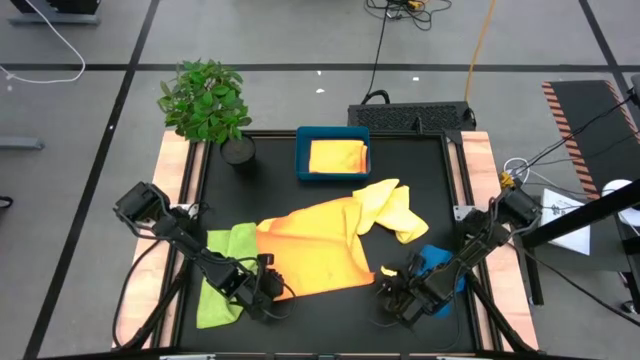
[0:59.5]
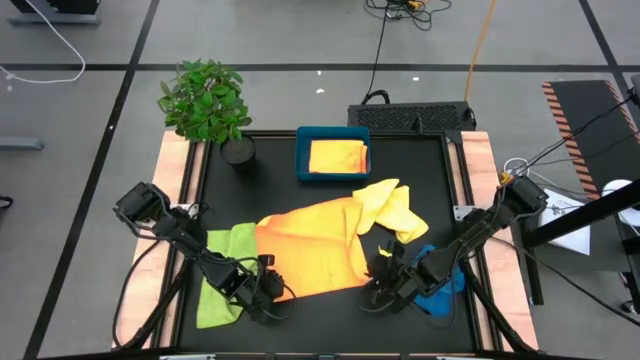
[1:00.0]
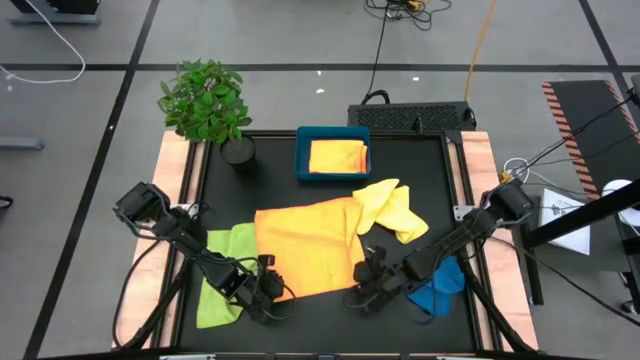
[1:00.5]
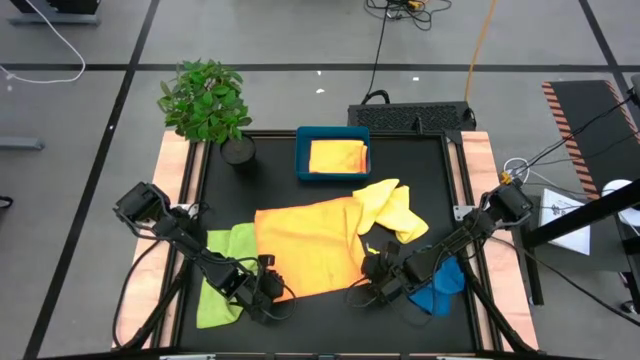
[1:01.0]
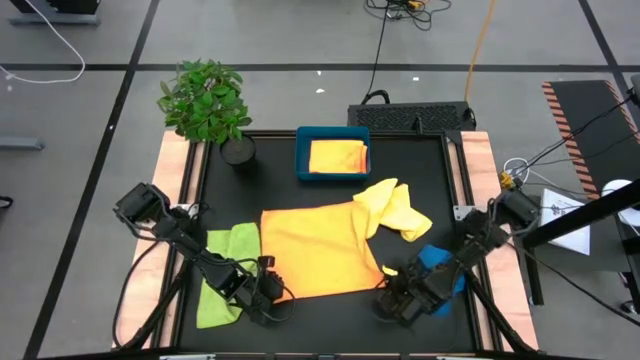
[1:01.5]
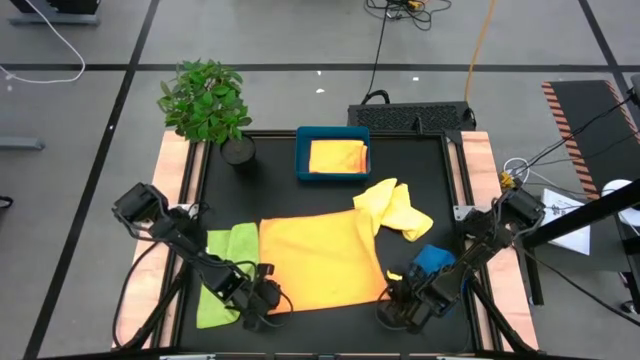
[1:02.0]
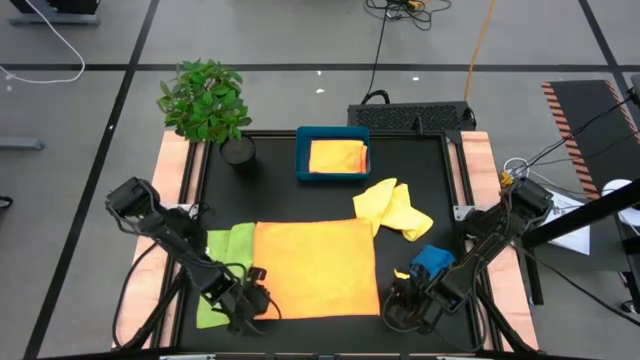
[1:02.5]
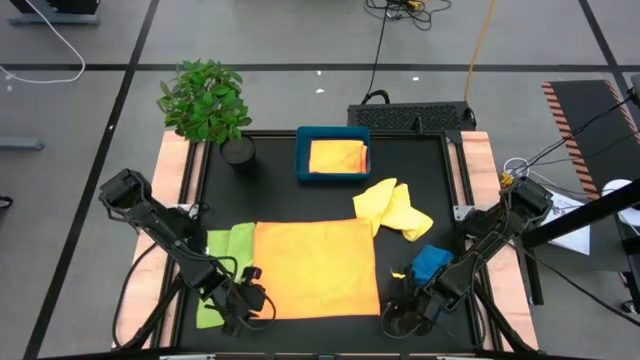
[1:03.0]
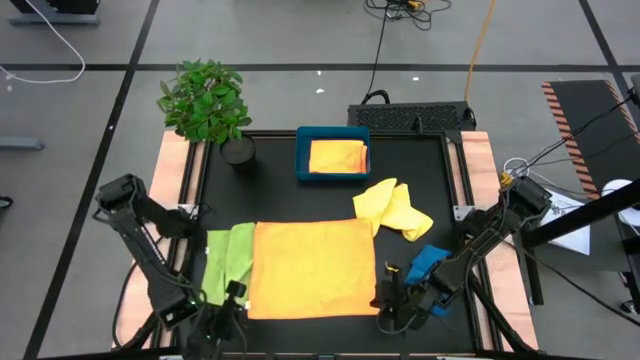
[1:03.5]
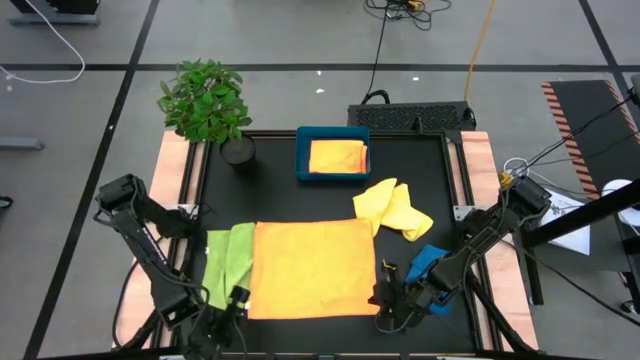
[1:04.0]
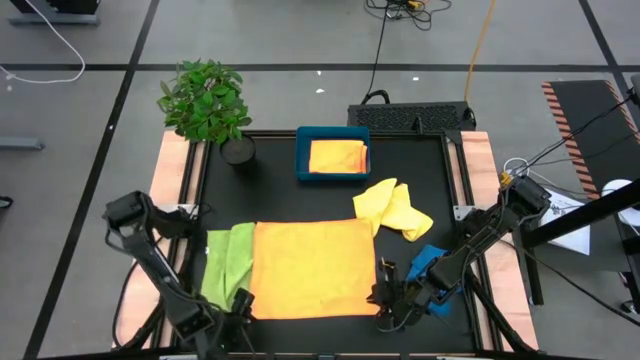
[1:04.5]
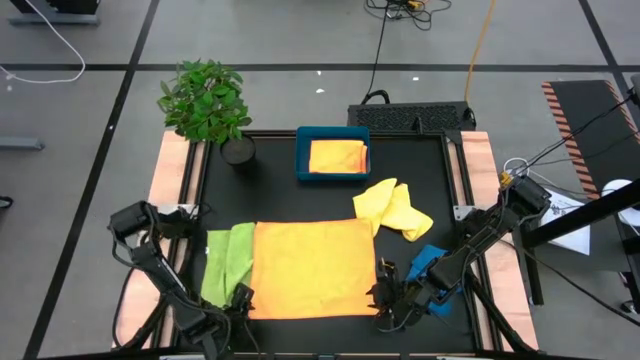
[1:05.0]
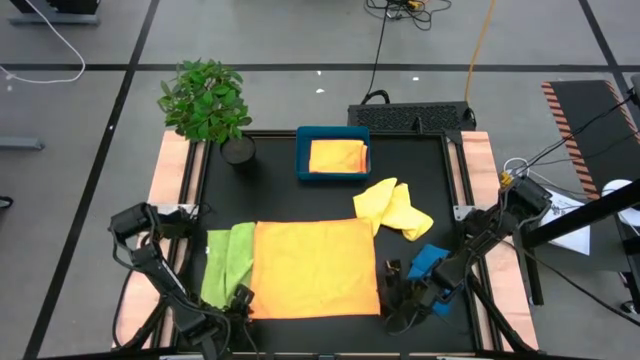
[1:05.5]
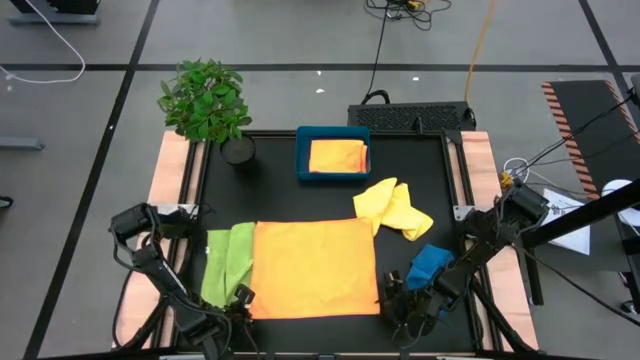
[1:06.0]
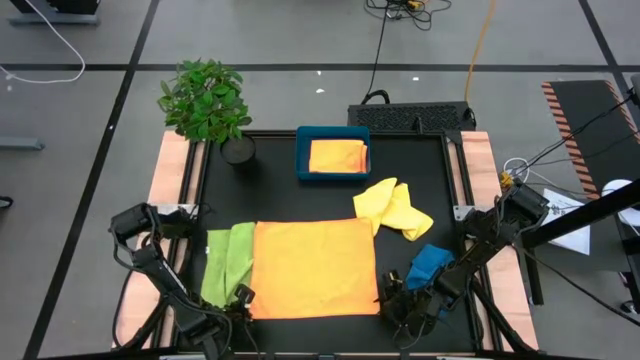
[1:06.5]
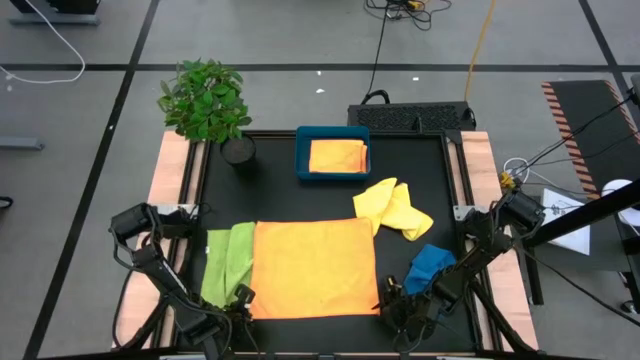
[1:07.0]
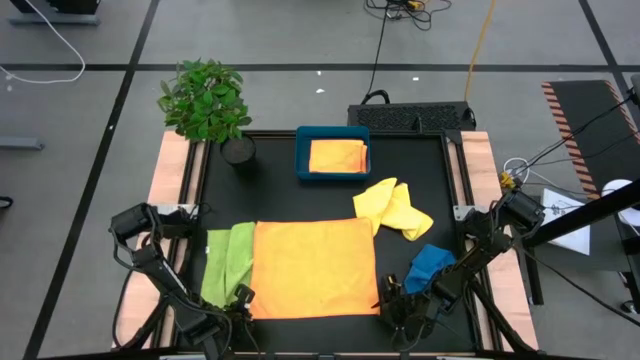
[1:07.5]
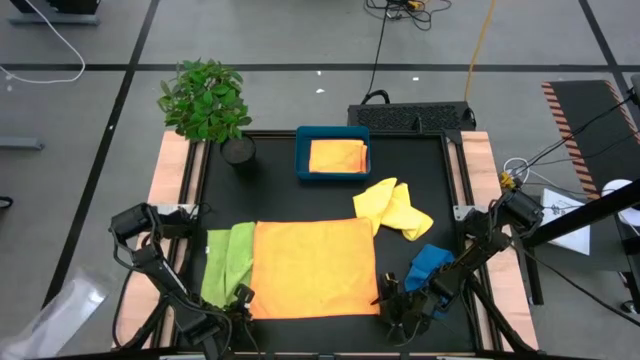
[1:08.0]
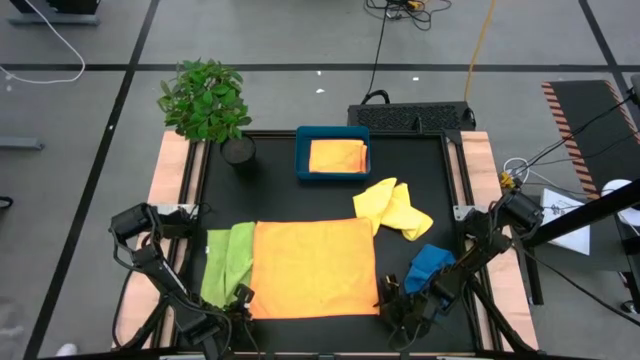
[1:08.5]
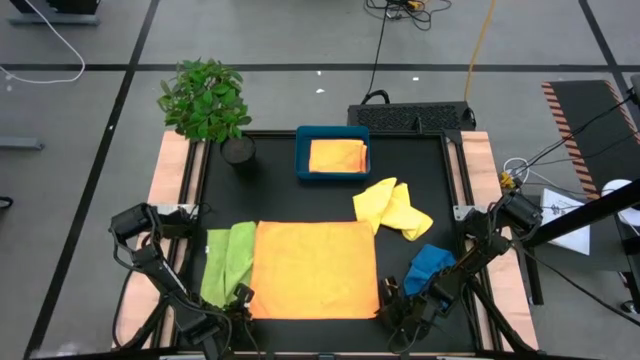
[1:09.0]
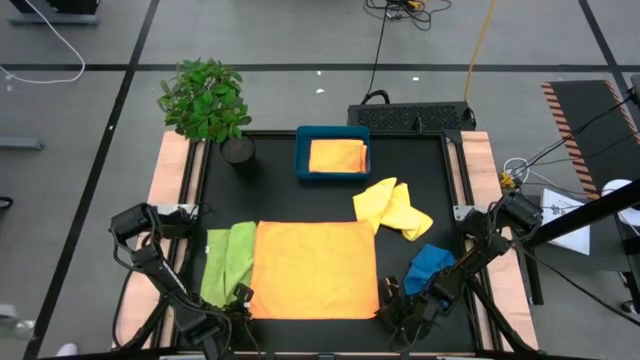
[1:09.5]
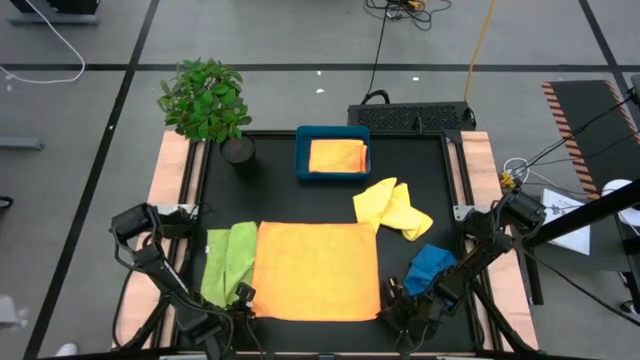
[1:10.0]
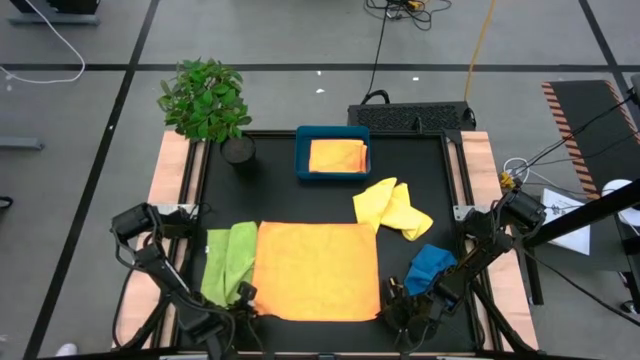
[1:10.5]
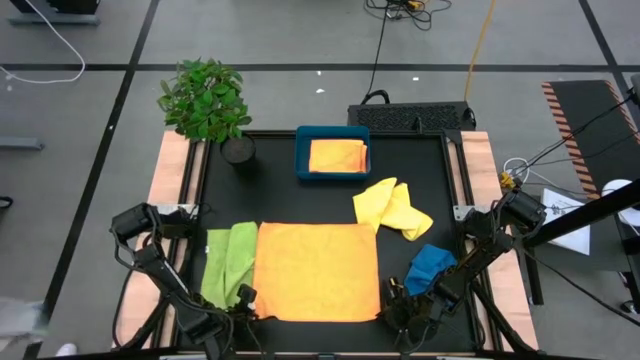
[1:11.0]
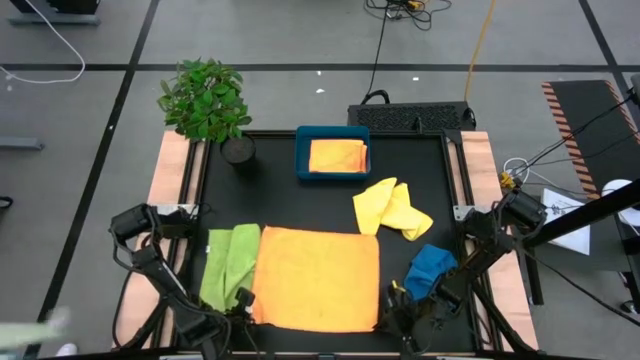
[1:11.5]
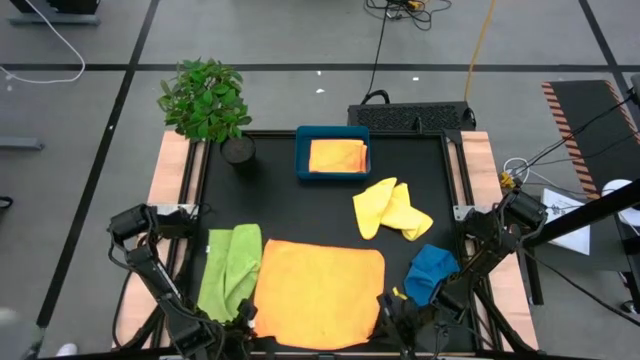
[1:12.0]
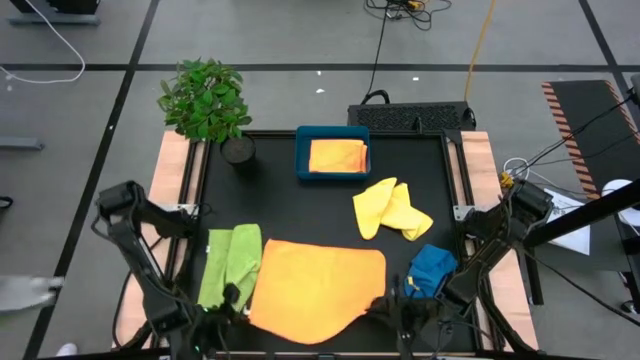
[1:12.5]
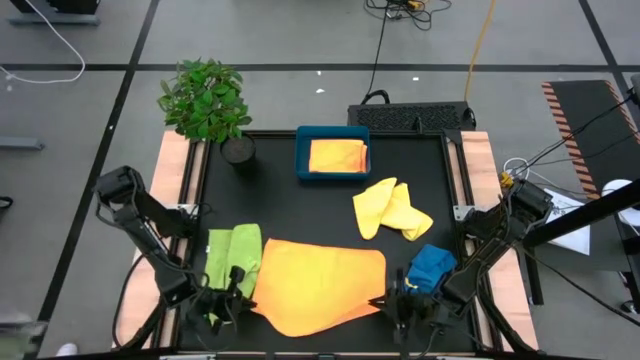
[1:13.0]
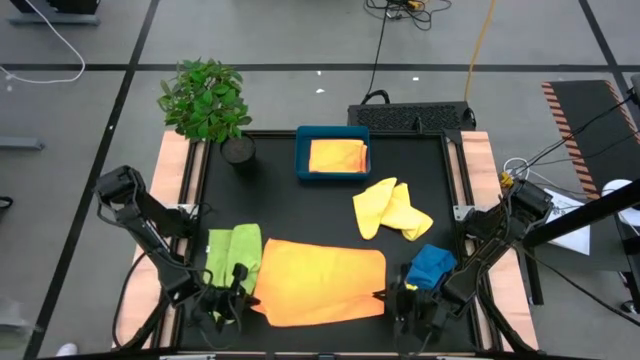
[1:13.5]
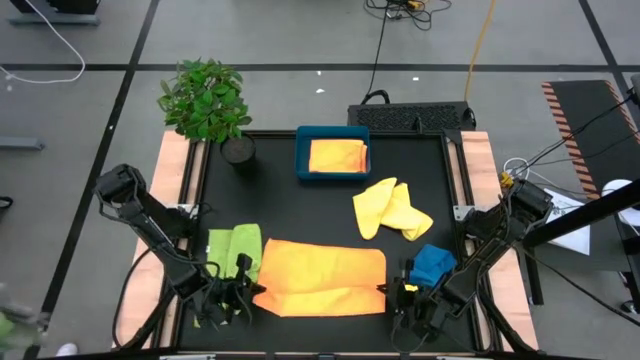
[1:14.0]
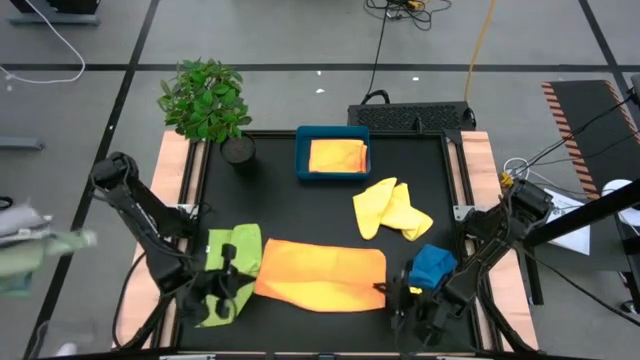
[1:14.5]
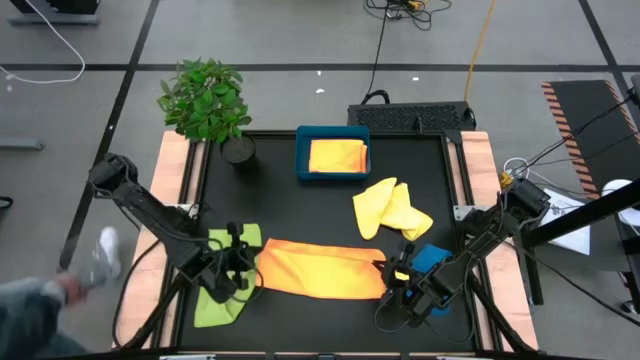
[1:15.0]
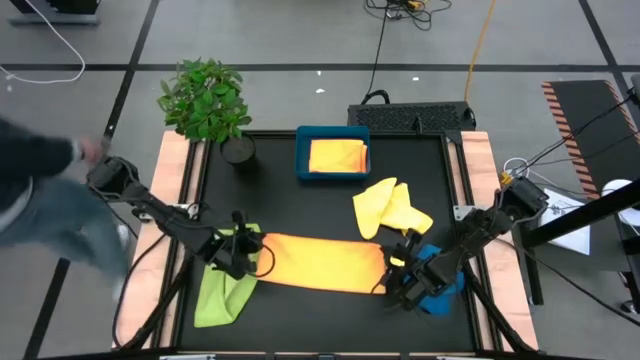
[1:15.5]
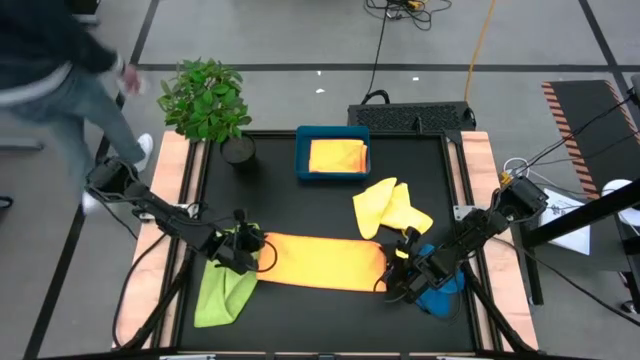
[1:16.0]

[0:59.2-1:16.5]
Task: Fold microfiber towels
Fold the orange microfiber towel

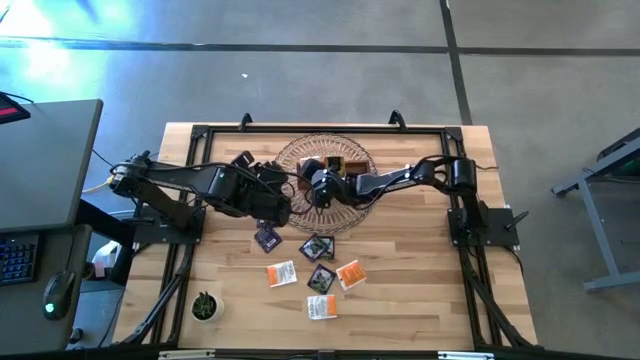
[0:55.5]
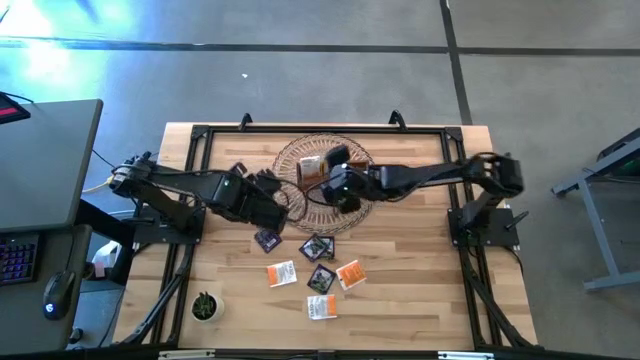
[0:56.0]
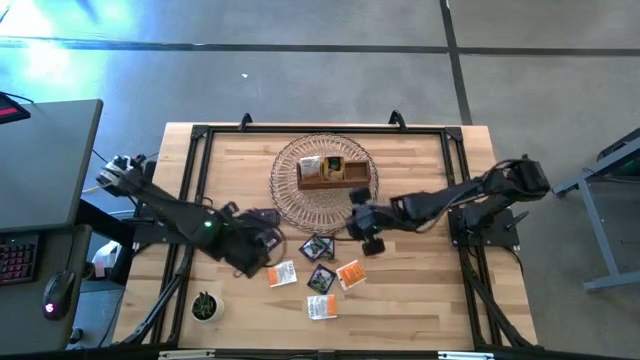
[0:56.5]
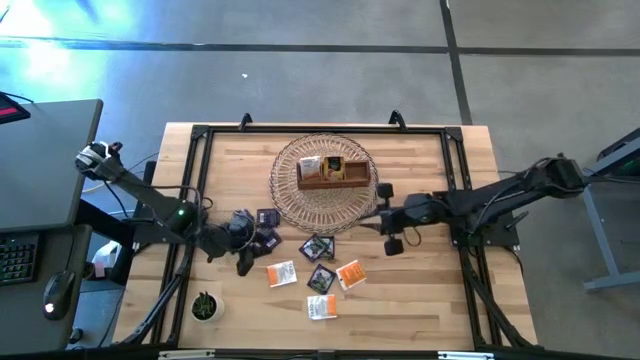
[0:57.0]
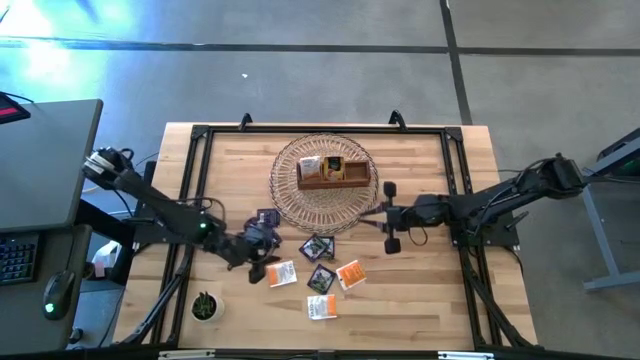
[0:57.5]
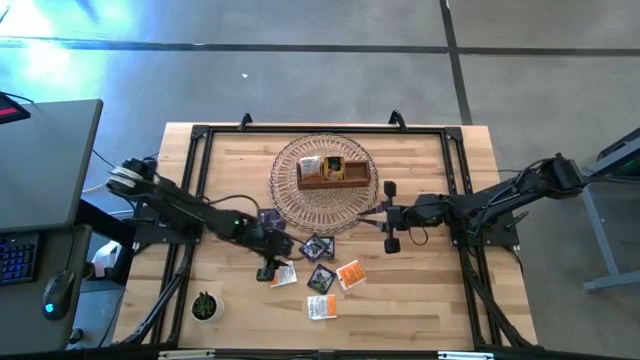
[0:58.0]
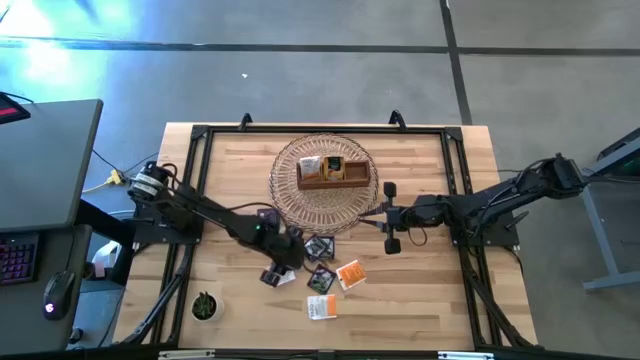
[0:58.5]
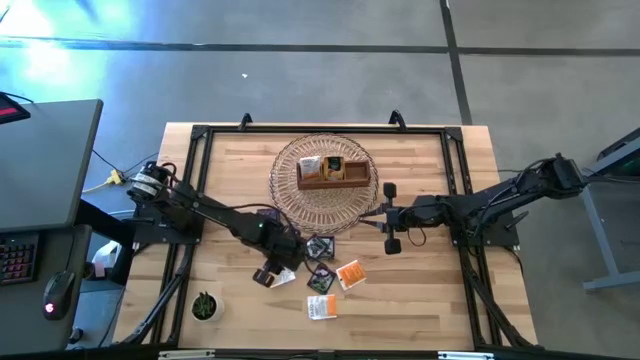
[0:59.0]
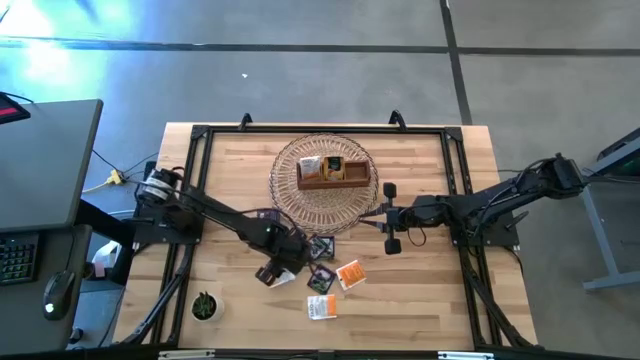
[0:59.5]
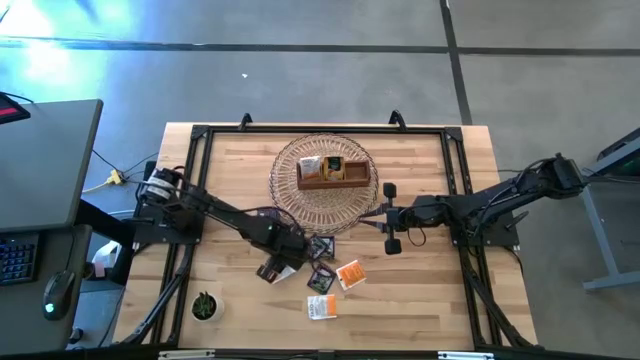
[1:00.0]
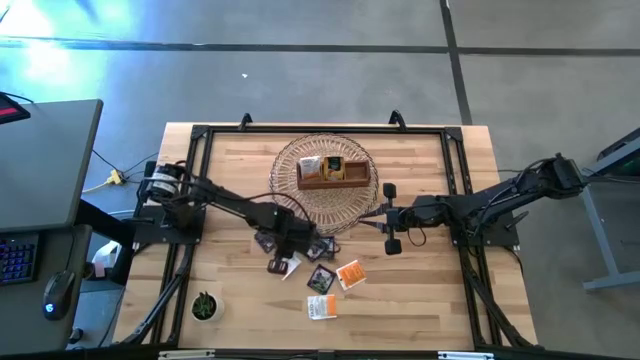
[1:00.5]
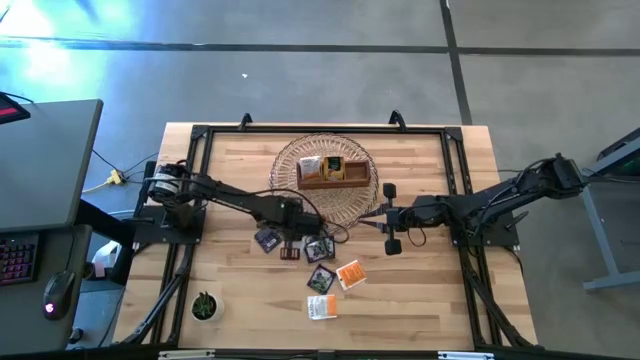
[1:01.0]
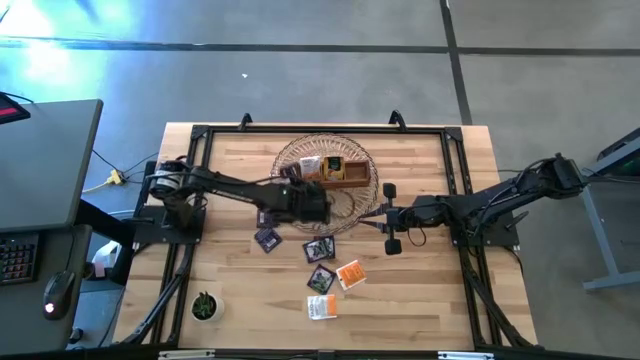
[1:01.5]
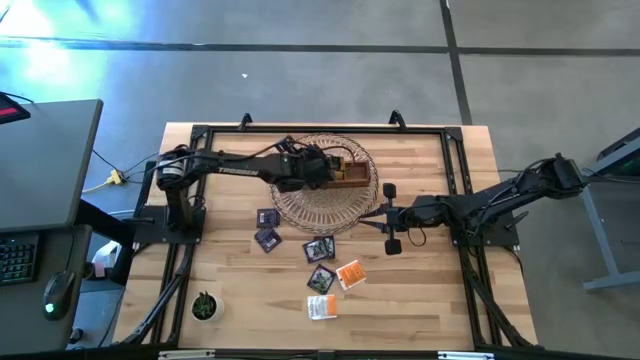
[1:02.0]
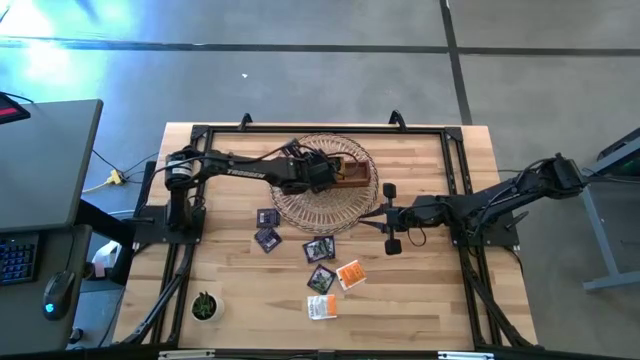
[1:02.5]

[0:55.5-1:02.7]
Task: Pick & Place Tea
Put the white tea bag into the left section of the wooden organizer
